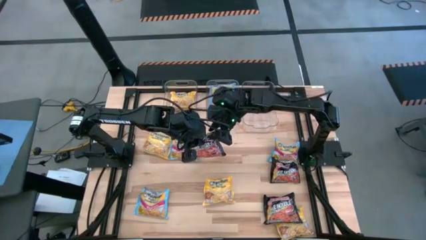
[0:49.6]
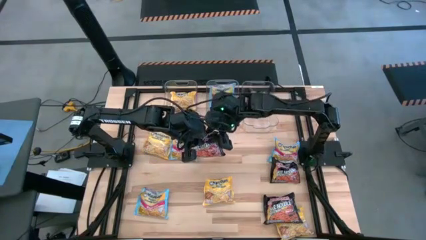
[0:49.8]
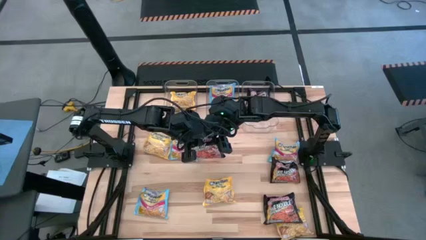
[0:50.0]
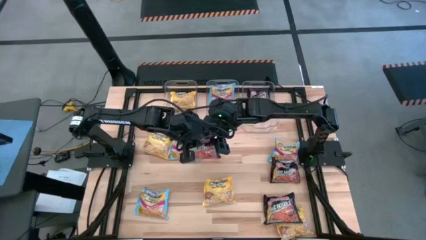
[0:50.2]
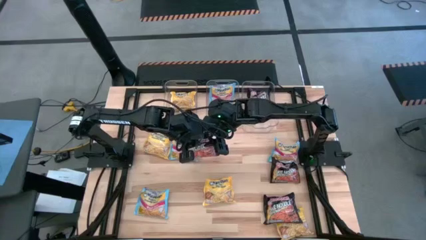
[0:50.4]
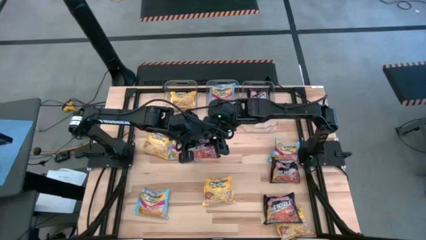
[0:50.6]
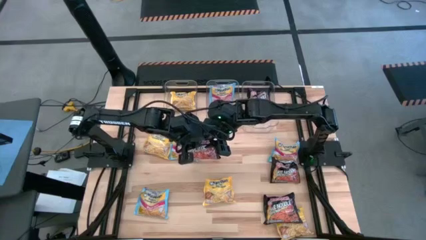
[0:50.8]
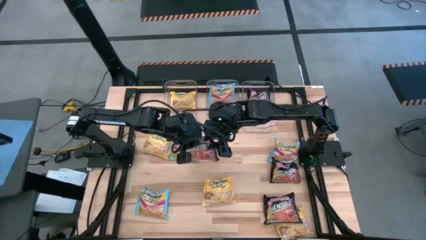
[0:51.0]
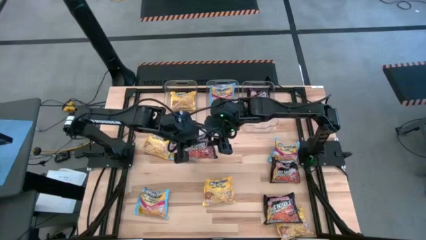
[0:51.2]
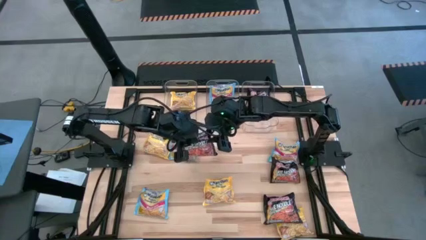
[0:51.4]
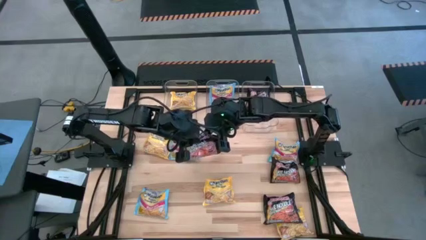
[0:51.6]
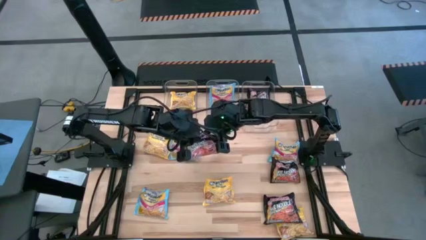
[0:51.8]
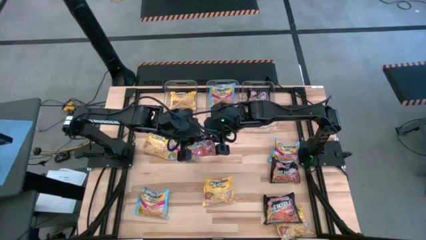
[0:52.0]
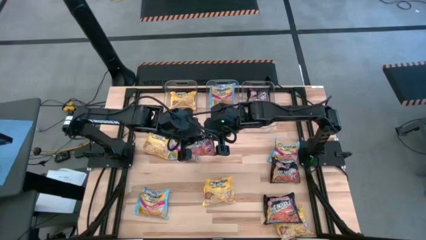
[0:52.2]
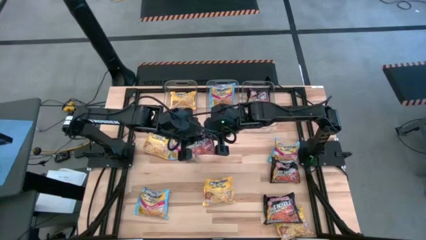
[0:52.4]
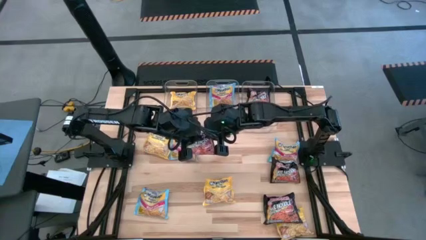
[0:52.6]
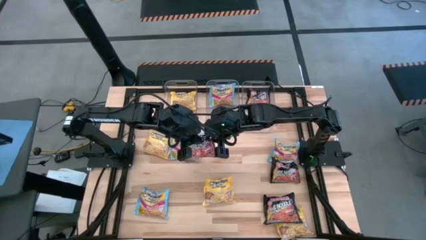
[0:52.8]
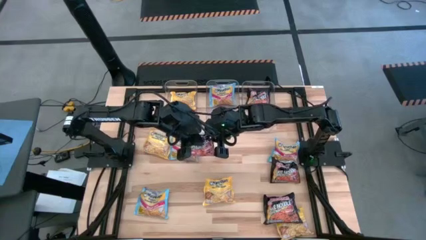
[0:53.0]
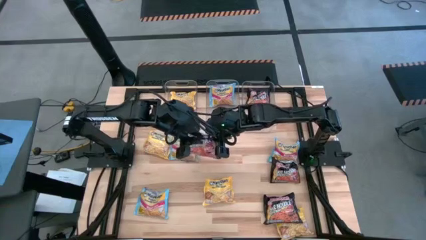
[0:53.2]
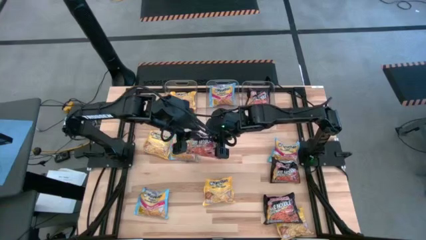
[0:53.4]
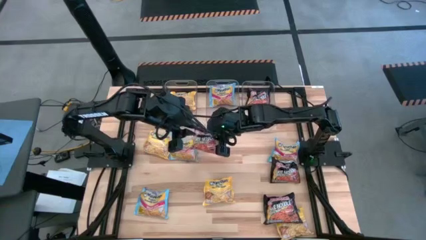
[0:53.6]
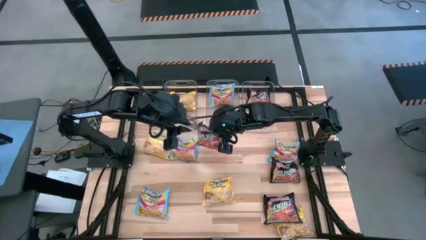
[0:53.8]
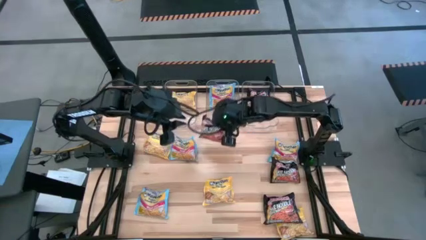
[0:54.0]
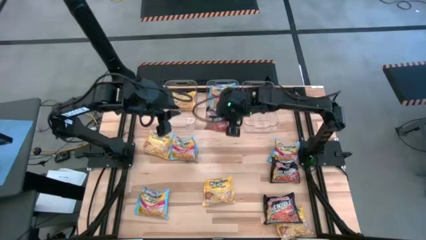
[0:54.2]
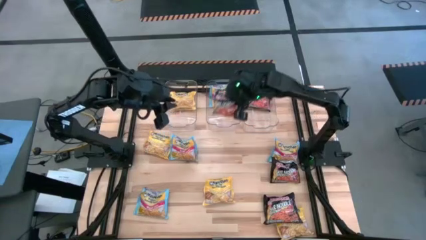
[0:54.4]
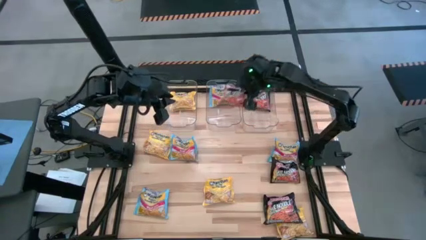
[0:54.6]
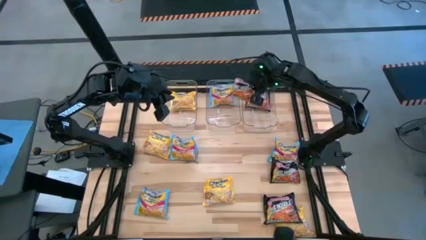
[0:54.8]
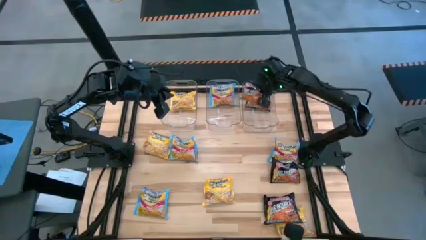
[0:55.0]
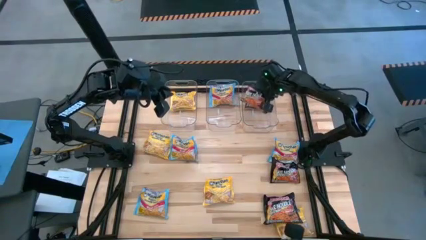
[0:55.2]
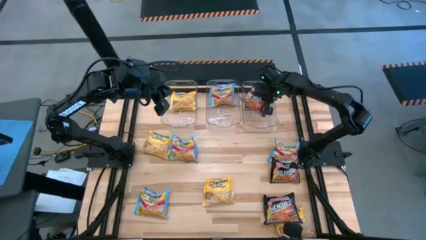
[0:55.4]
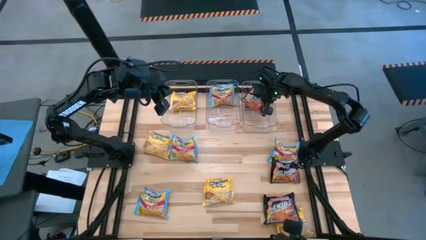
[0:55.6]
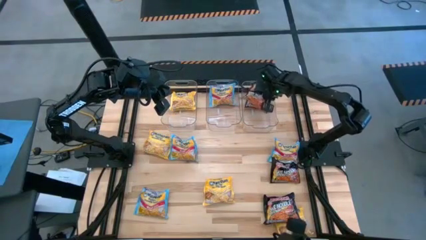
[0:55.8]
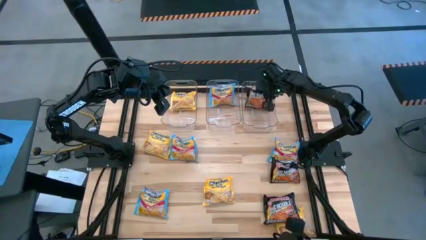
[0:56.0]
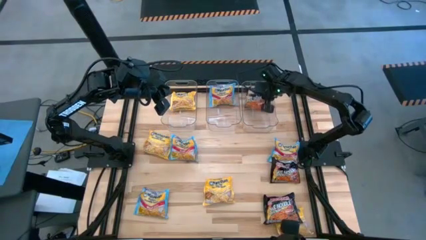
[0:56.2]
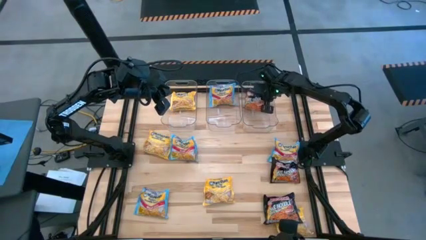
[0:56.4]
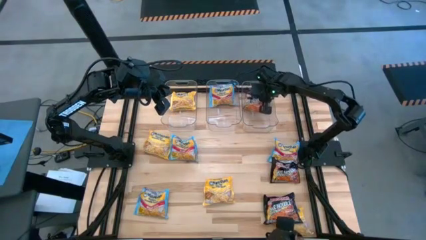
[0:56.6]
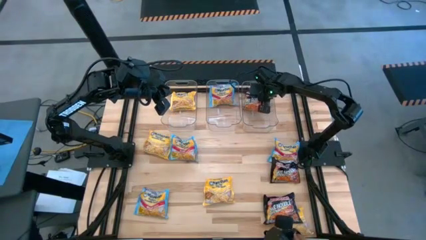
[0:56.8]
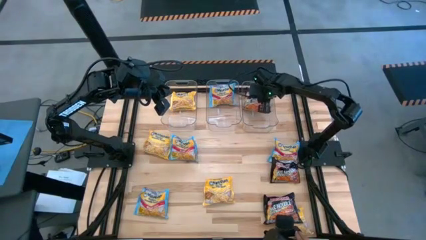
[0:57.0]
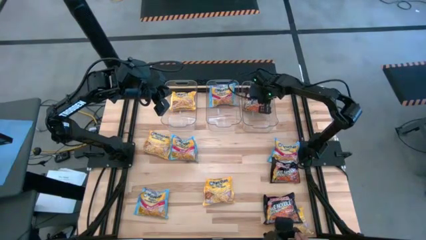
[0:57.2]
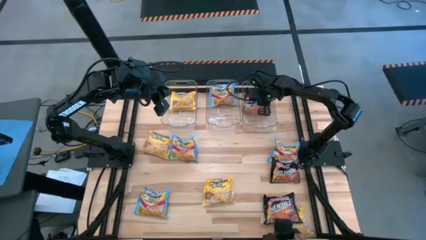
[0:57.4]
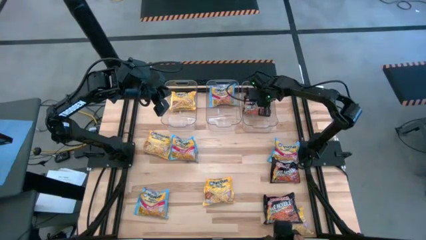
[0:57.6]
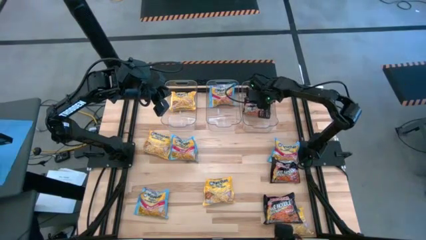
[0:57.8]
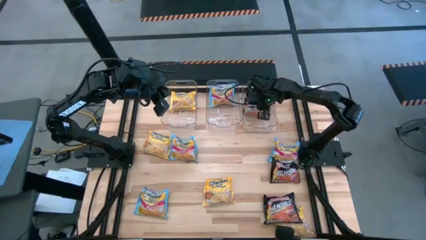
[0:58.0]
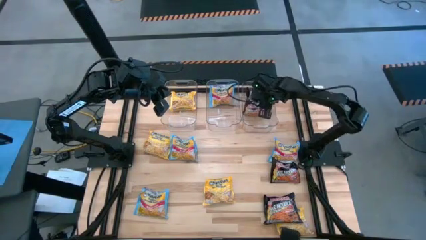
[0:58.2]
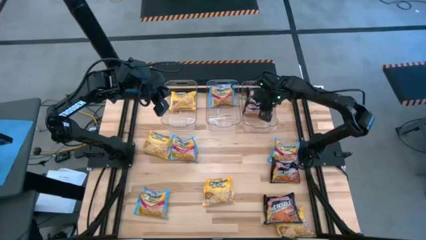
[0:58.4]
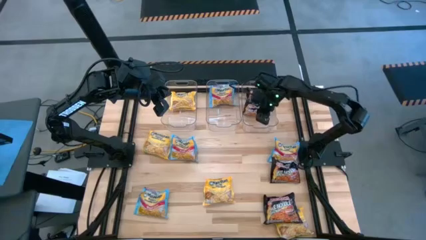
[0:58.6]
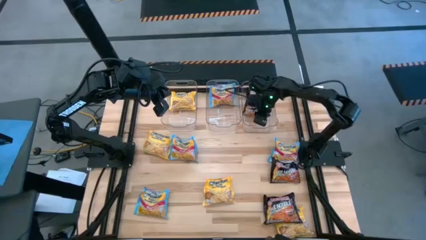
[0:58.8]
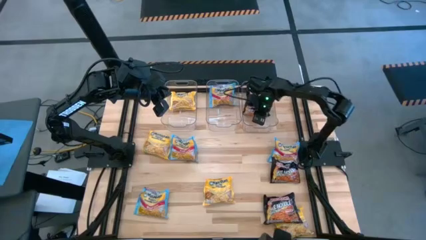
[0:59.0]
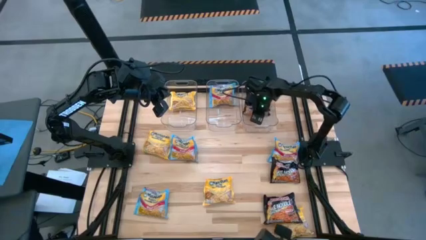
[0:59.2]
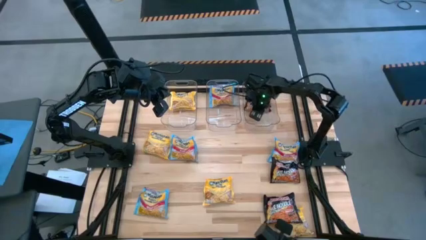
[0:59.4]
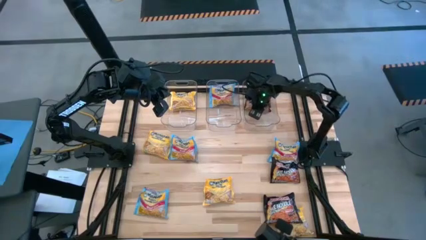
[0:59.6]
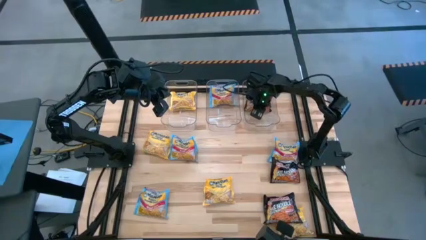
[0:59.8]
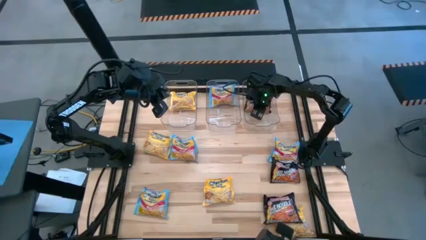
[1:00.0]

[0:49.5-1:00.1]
Task: Sort Maruchan noodles
Put the black noodle pack into the right transparent bin
